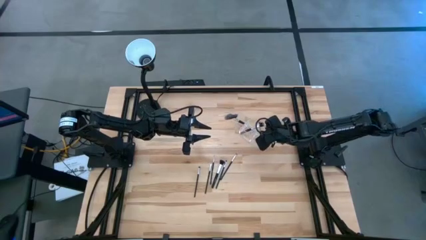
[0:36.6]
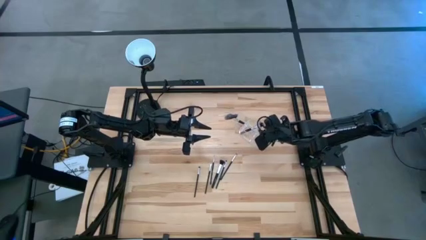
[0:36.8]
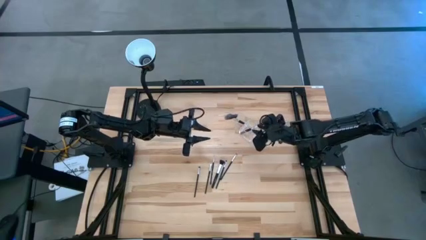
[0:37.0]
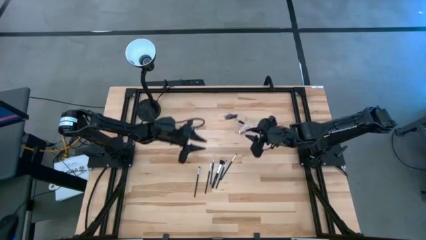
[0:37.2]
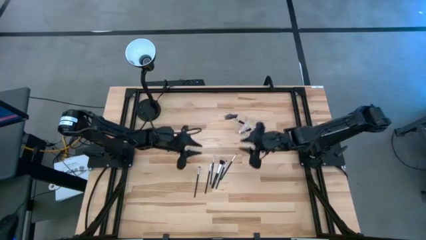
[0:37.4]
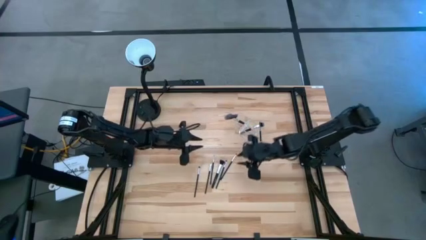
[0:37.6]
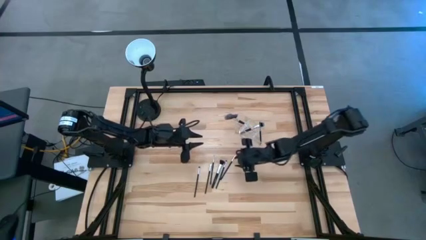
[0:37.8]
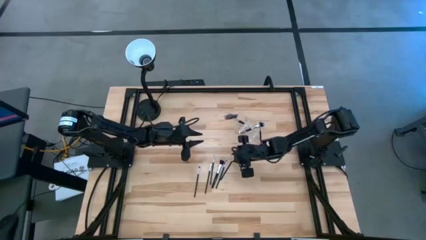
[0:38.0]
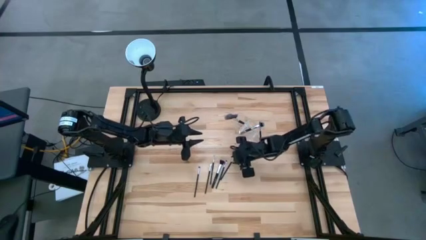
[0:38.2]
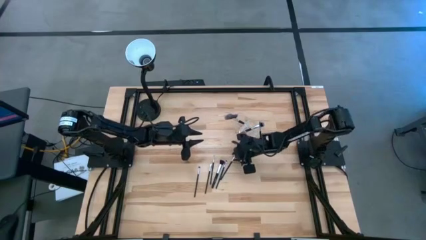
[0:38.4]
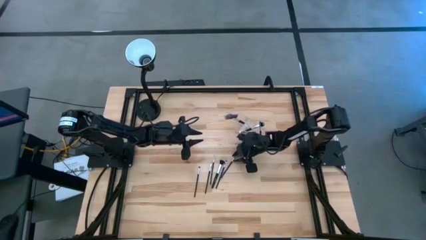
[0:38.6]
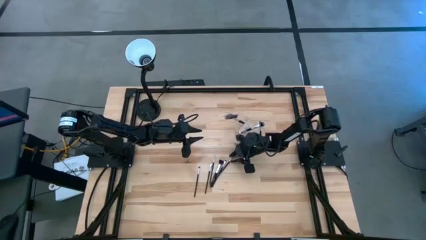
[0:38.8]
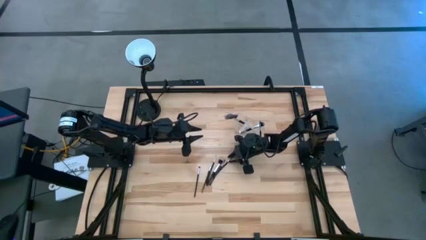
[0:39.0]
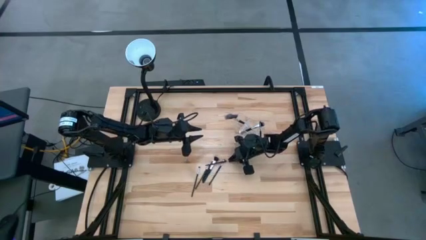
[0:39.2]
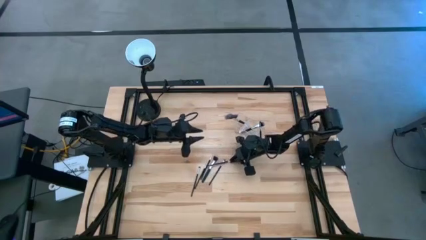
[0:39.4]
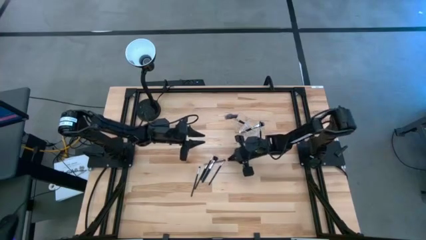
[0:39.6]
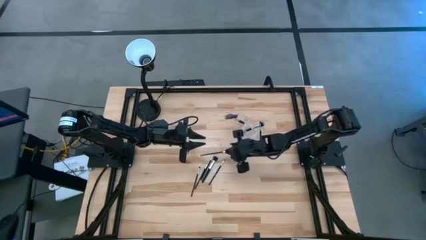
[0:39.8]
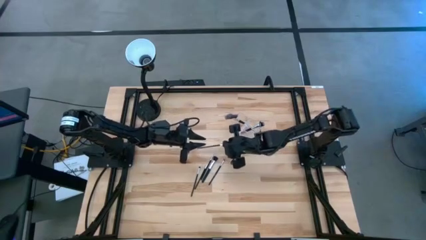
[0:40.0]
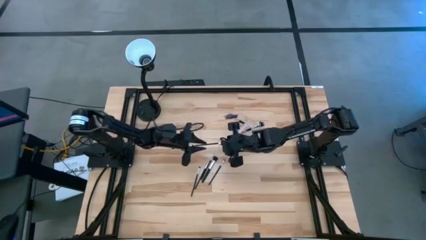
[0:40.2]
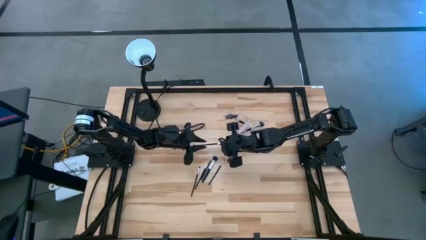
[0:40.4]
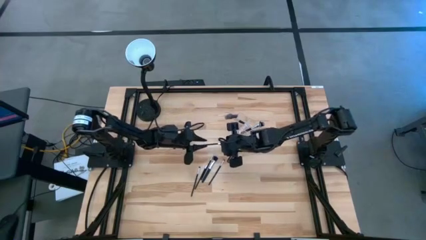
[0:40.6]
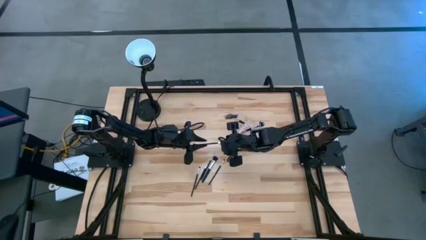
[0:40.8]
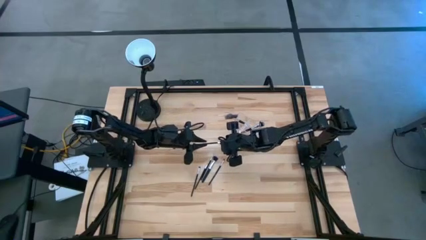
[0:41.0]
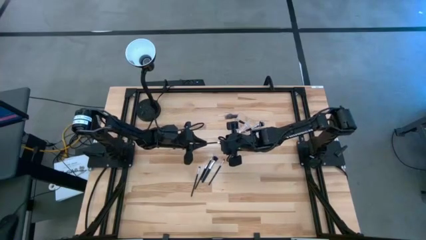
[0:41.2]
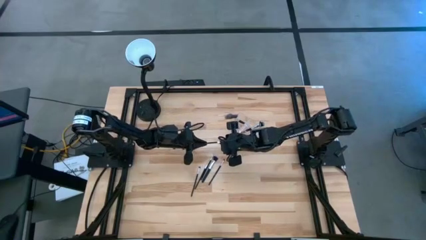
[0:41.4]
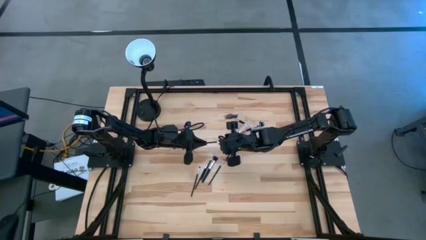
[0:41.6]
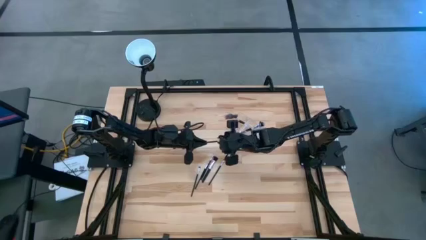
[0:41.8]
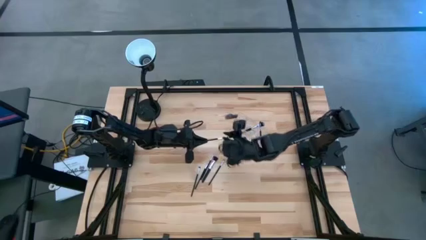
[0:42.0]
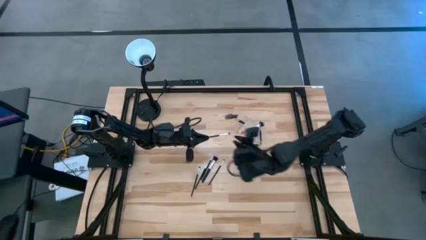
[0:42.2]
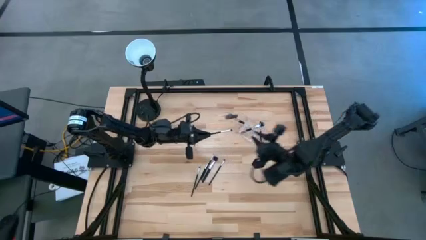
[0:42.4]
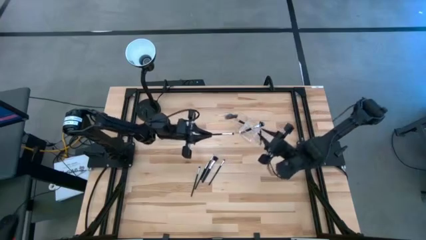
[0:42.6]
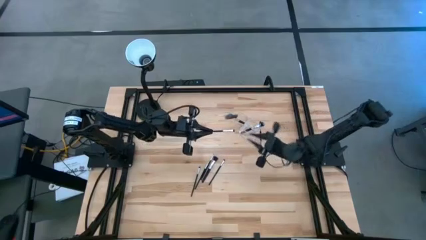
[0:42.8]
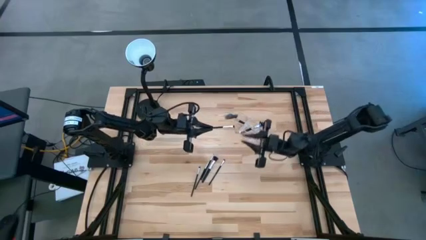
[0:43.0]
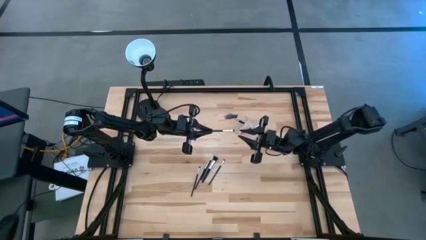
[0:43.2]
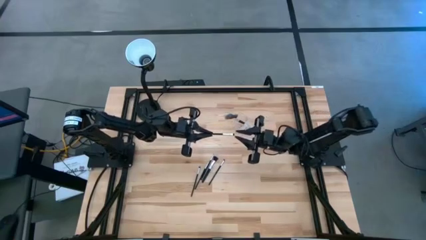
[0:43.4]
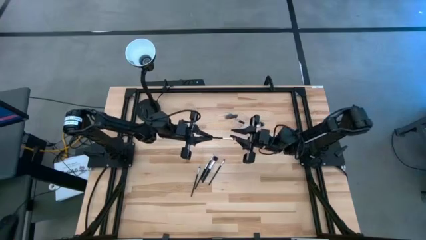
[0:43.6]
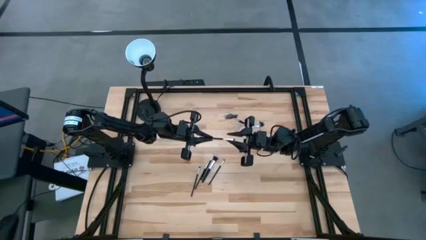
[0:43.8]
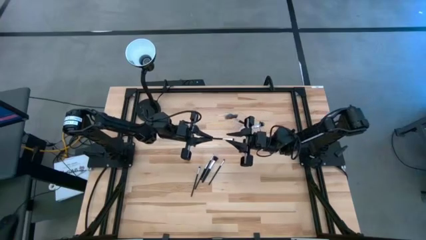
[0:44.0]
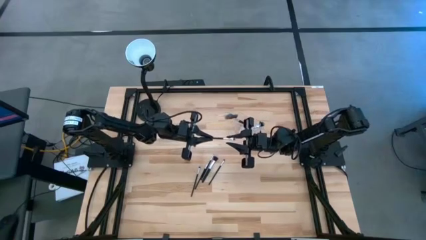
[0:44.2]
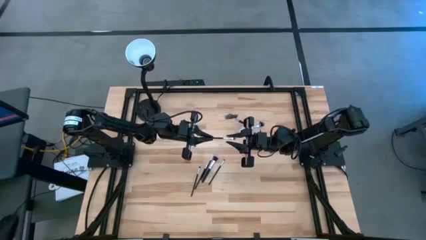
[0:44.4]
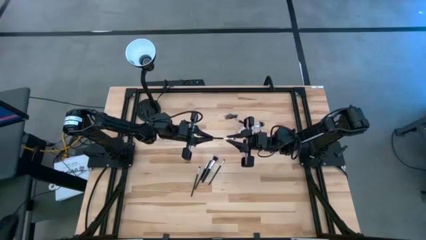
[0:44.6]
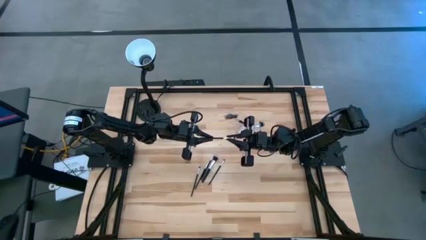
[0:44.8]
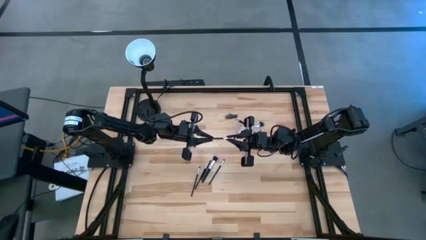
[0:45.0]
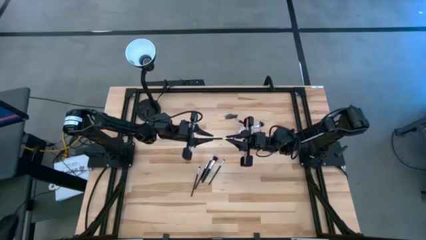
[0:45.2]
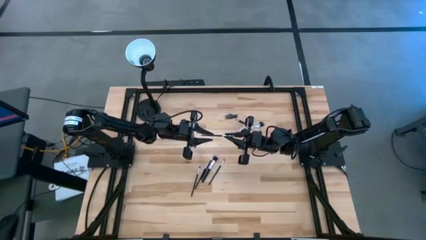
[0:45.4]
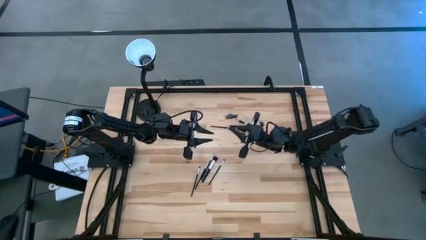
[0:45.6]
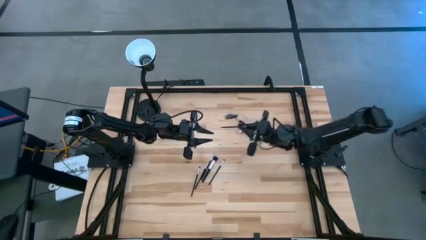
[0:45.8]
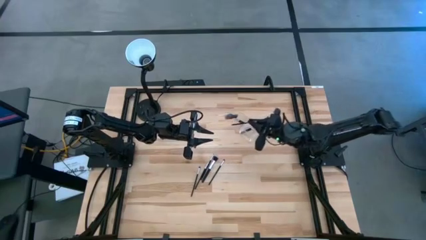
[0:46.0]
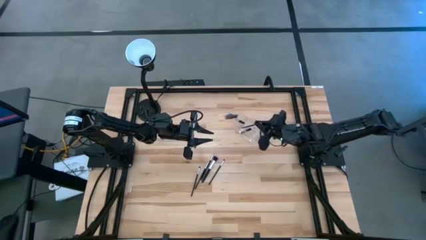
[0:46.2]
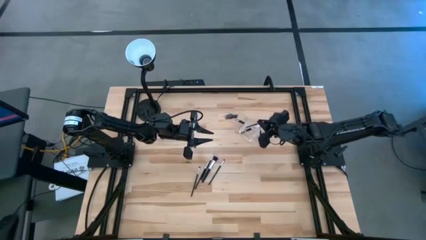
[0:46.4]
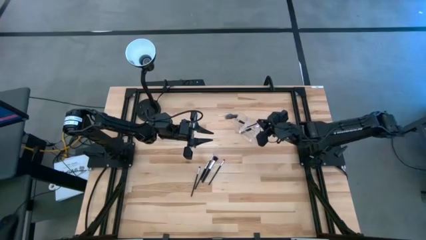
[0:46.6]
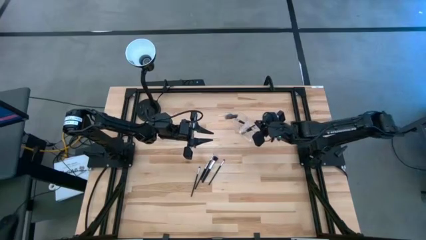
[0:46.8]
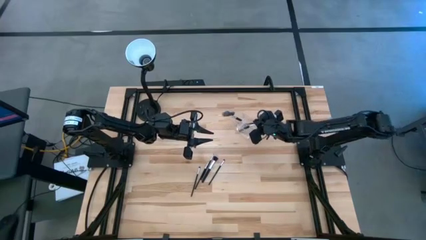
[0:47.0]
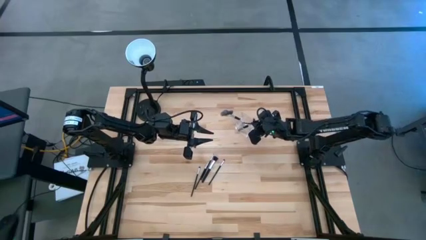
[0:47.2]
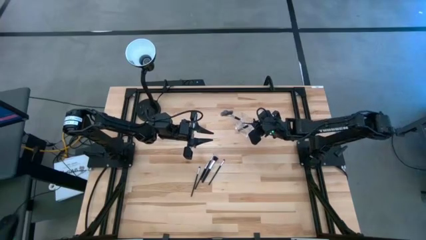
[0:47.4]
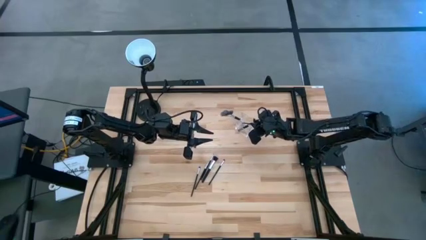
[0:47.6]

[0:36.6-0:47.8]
Task: Sort items
Put the eyeshadow brush into the middle of the transparent organizer

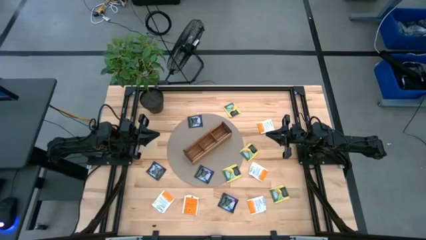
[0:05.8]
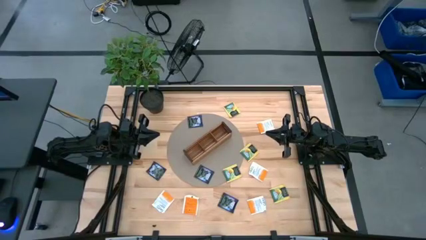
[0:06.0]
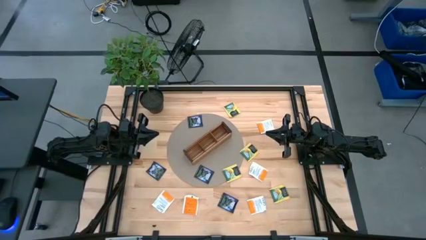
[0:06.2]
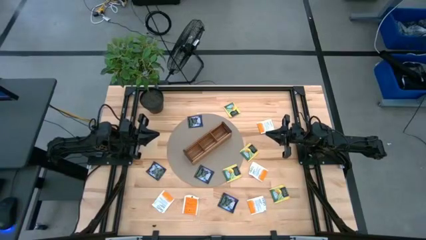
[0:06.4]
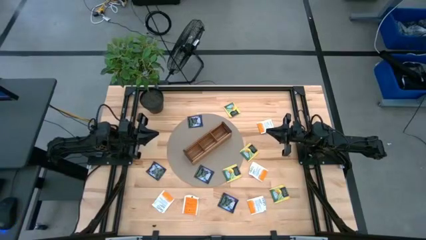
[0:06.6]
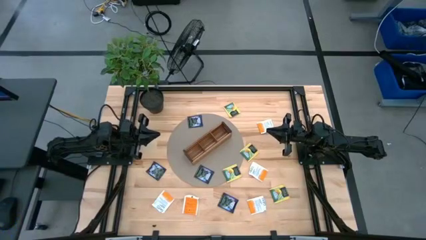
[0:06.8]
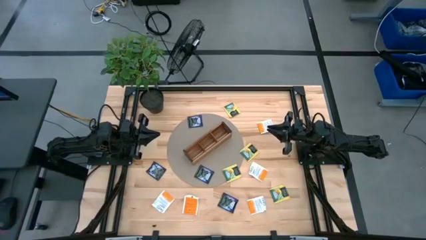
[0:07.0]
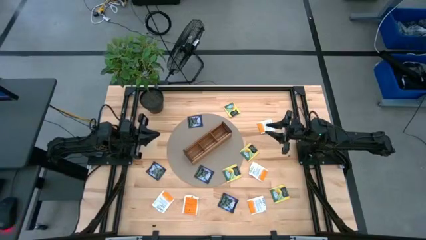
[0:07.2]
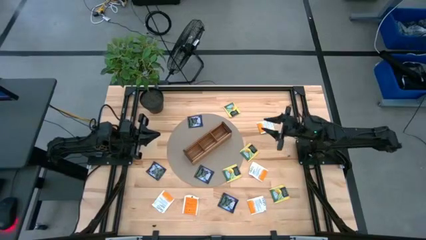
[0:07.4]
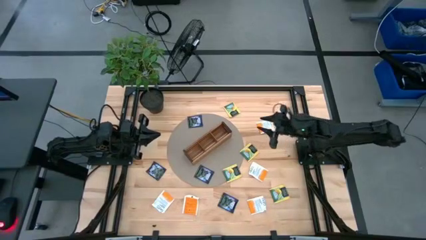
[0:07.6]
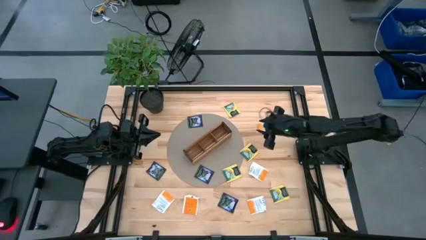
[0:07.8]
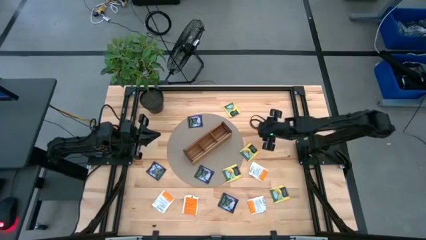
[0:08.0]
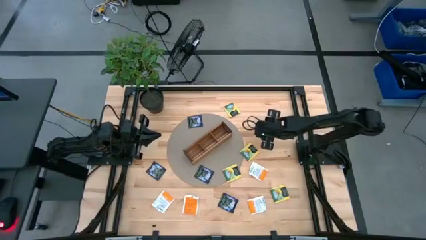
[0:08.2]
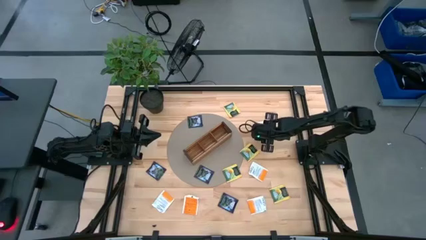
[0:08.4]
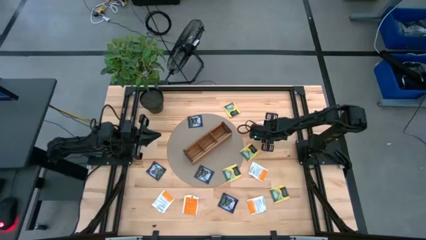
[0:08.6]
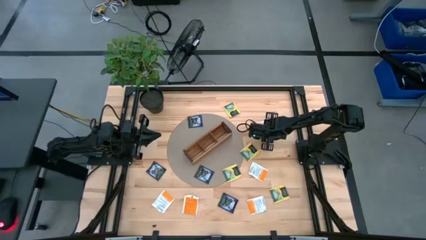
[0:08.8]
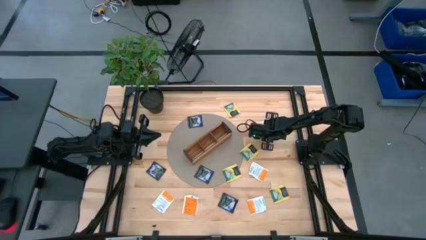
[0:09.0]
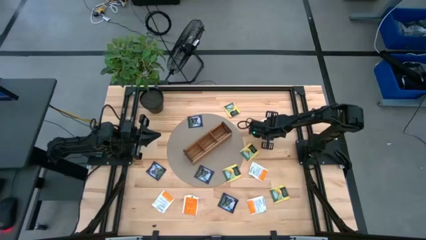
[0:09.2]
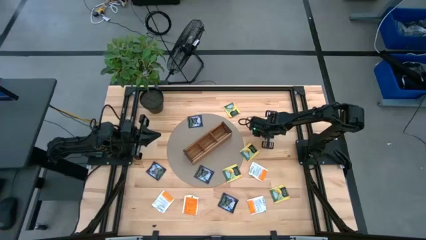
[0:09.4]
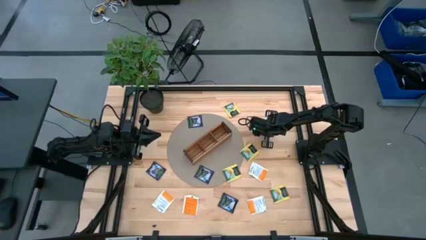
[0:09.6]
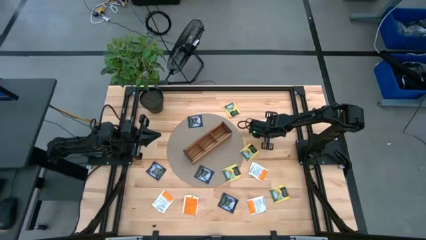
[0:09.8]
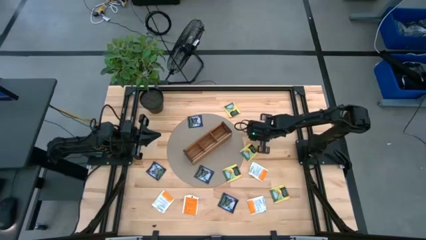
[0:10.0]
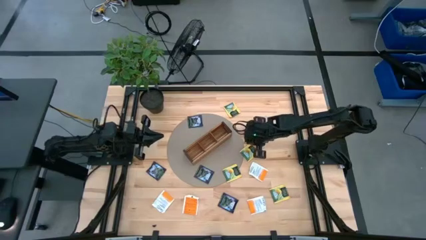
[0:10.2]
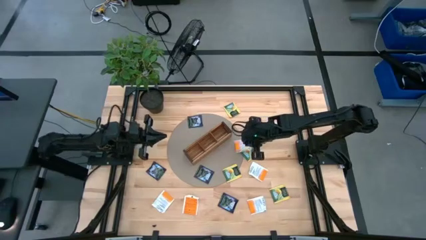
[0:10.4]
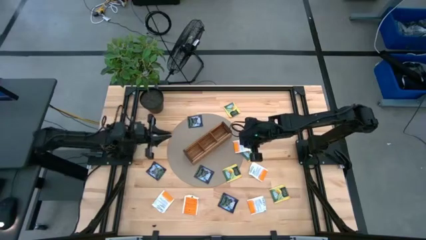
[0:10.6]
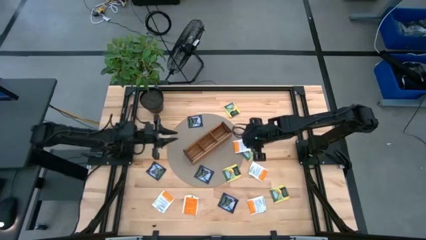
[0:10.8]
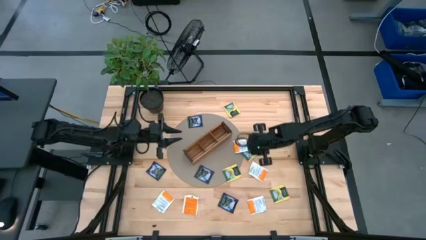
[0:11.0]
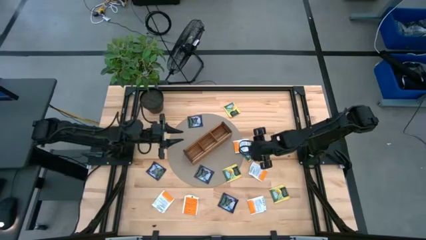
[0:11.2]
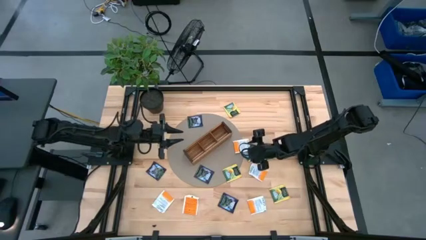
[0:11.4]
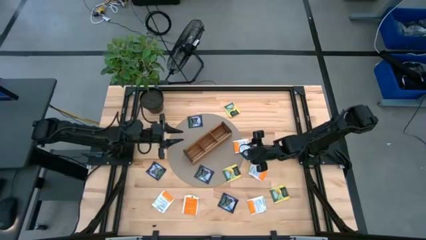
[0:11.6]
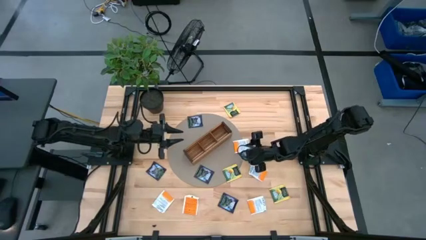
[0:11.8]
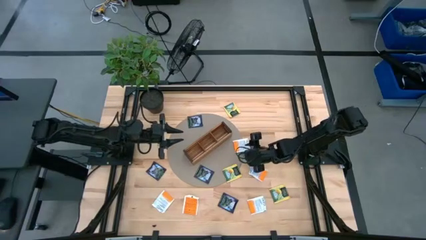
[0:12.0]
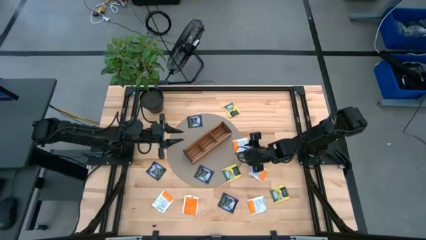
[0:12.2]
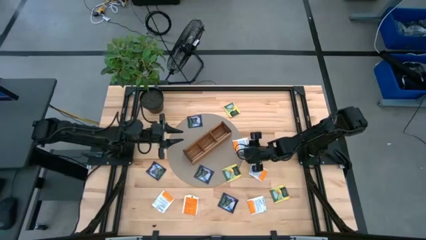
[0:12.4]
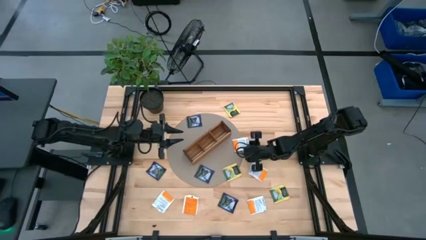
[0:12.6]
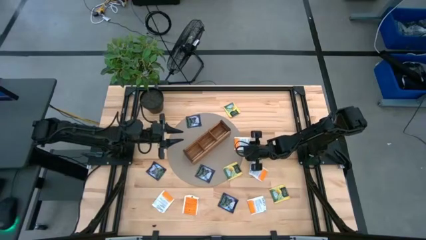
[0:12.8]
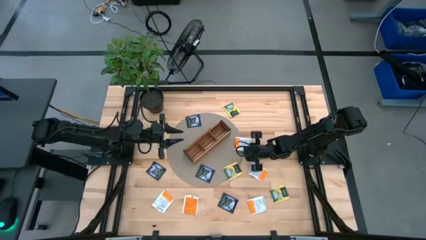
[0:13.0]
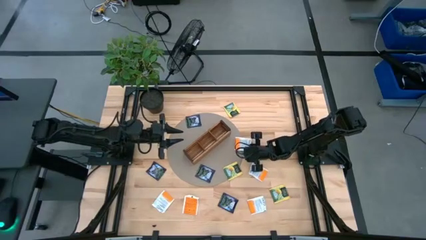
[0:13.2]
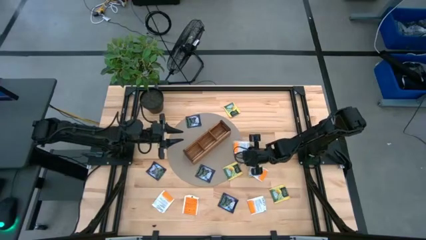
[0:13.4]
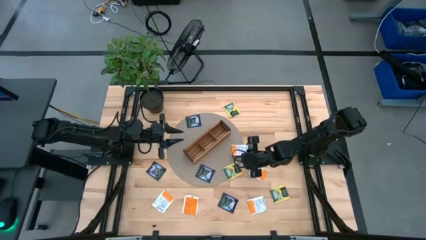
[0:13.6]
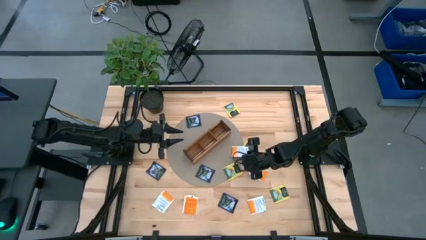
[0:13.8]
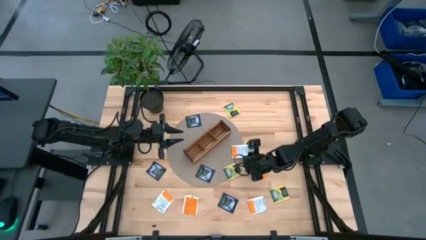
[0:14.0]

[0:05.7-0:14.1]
Task: Pick & Place Tea
Put the orange tea bag into the right section of the wooden organizer
